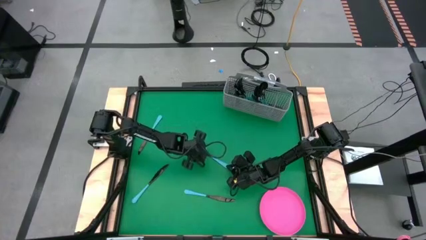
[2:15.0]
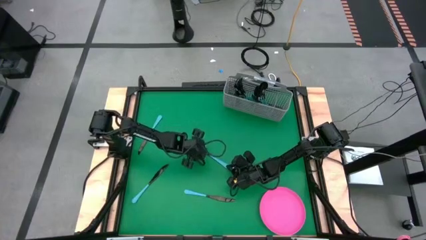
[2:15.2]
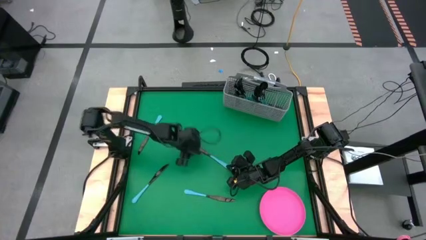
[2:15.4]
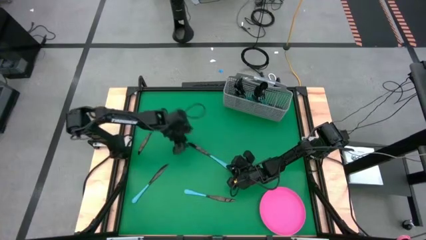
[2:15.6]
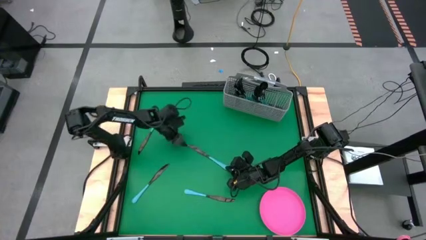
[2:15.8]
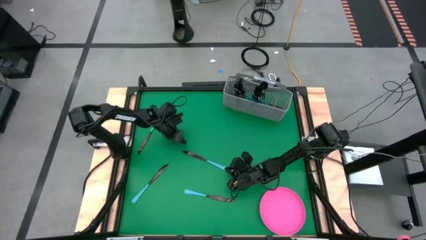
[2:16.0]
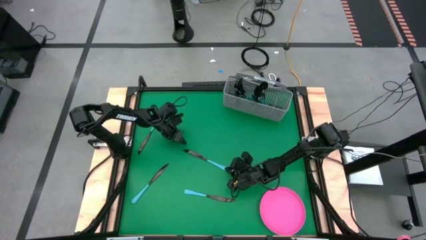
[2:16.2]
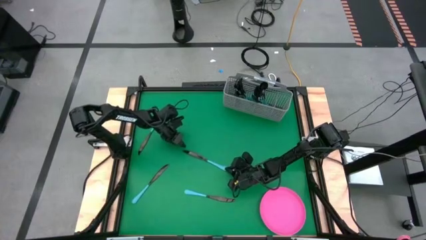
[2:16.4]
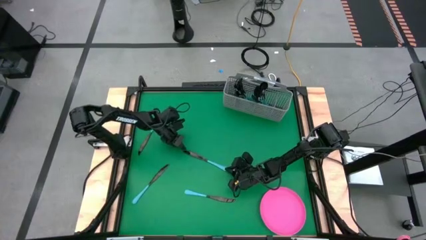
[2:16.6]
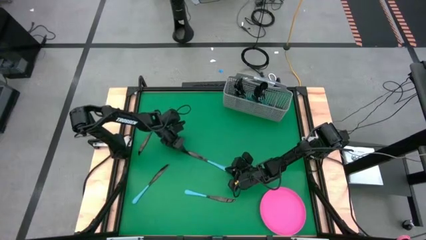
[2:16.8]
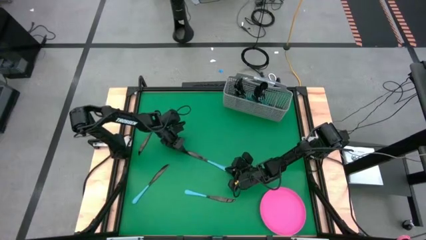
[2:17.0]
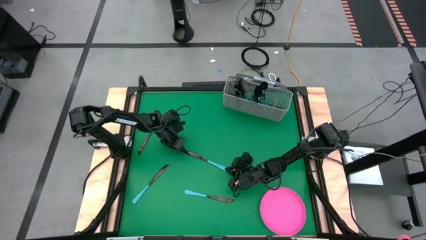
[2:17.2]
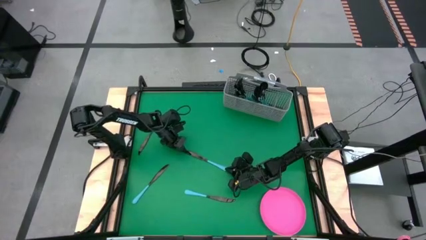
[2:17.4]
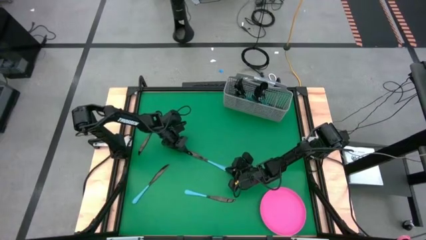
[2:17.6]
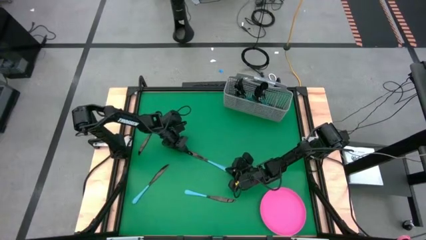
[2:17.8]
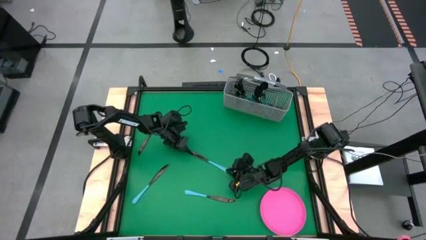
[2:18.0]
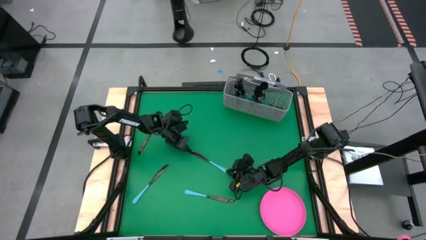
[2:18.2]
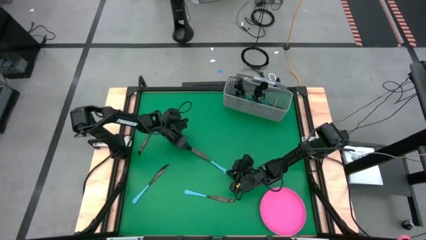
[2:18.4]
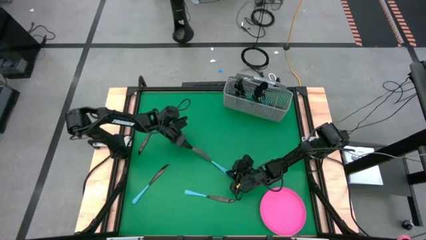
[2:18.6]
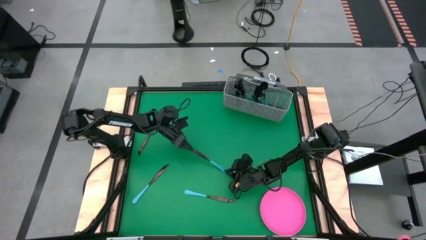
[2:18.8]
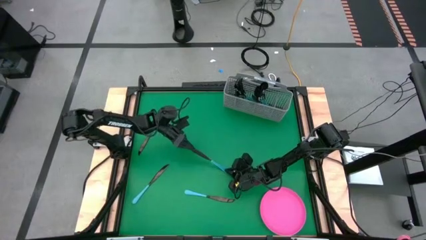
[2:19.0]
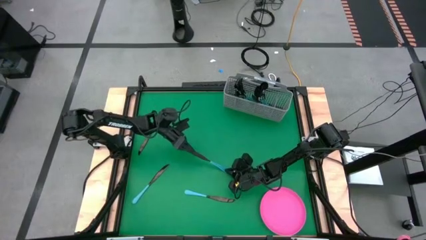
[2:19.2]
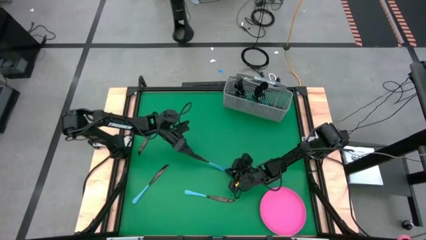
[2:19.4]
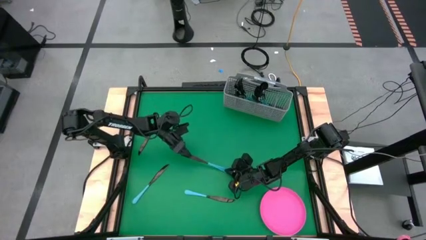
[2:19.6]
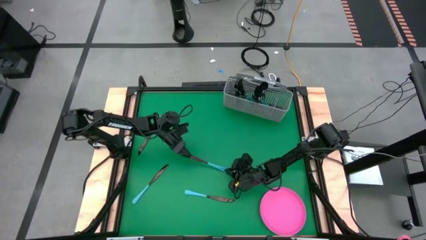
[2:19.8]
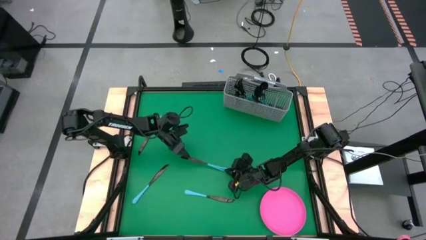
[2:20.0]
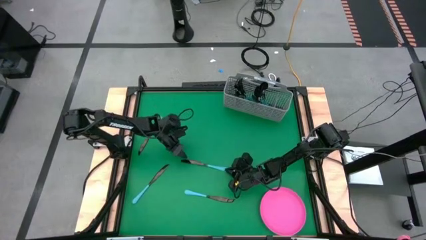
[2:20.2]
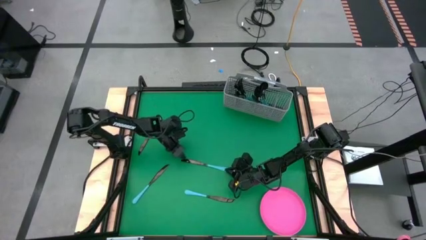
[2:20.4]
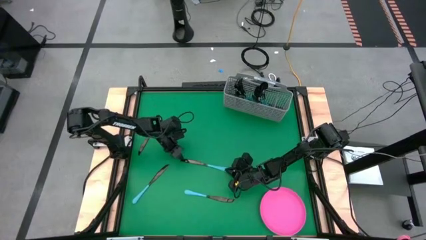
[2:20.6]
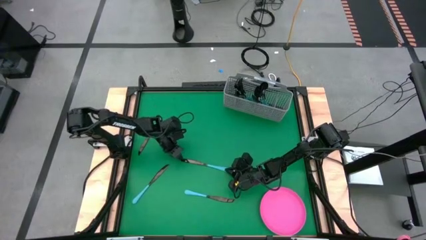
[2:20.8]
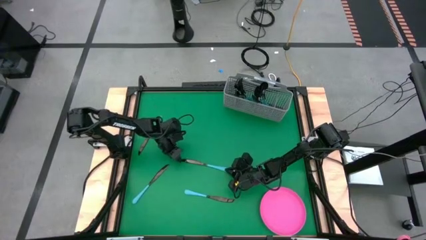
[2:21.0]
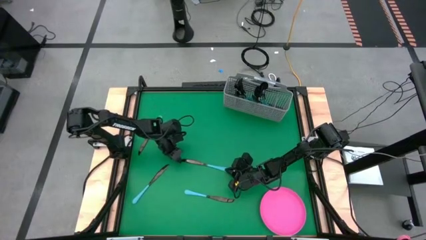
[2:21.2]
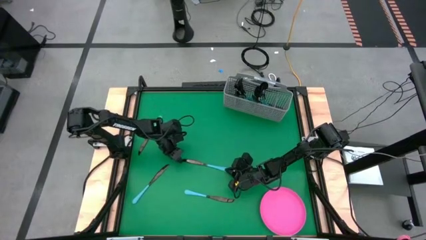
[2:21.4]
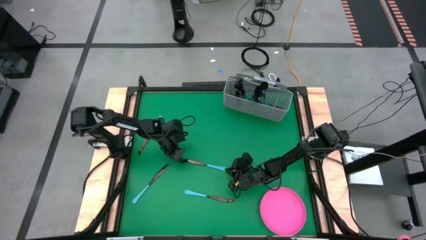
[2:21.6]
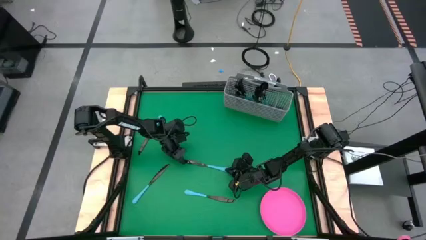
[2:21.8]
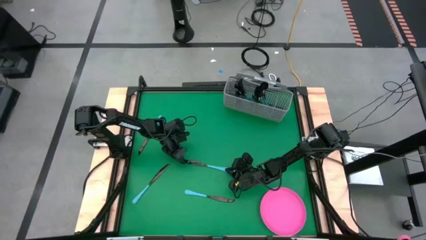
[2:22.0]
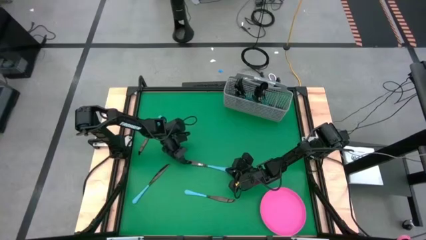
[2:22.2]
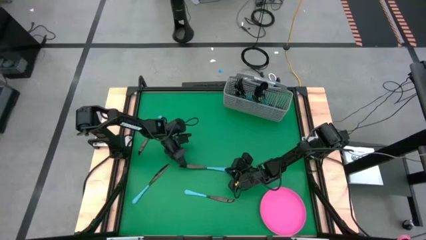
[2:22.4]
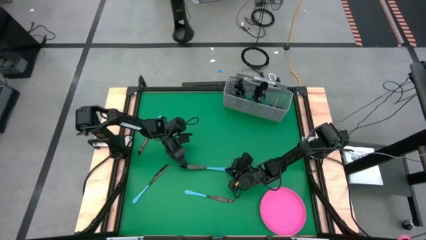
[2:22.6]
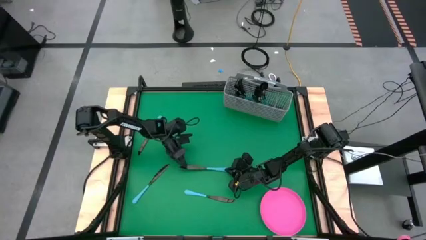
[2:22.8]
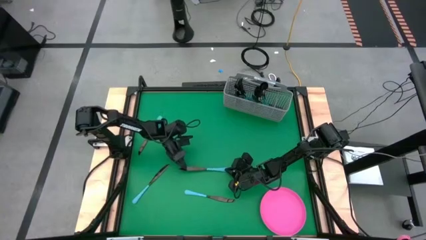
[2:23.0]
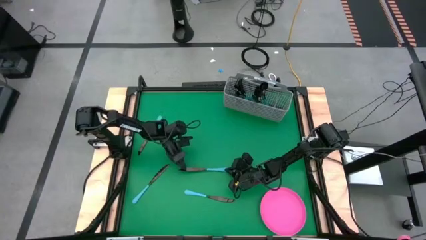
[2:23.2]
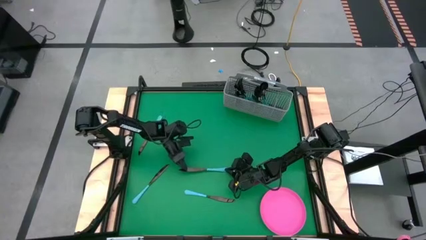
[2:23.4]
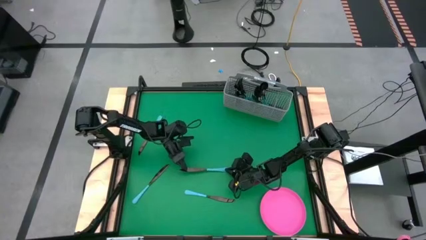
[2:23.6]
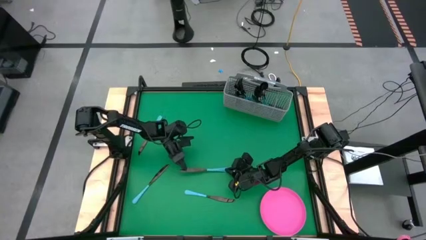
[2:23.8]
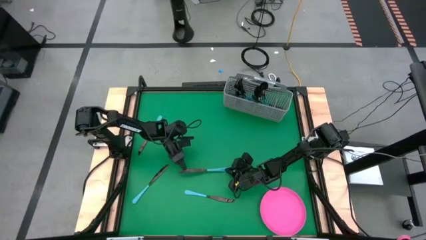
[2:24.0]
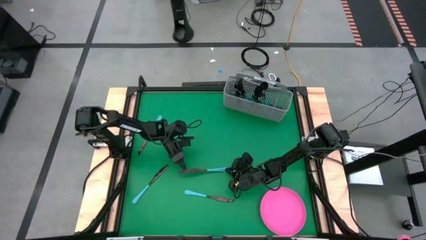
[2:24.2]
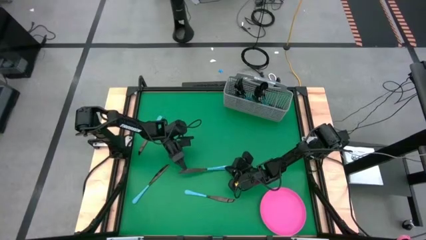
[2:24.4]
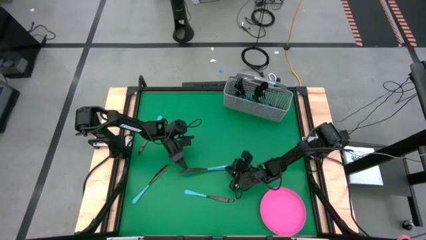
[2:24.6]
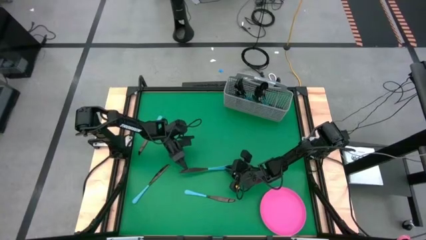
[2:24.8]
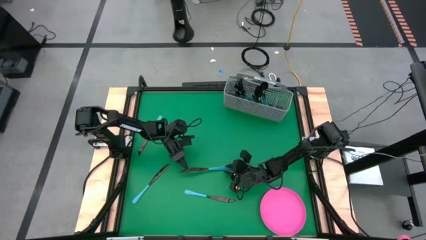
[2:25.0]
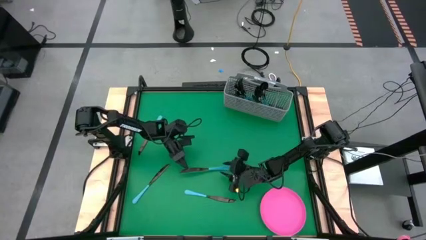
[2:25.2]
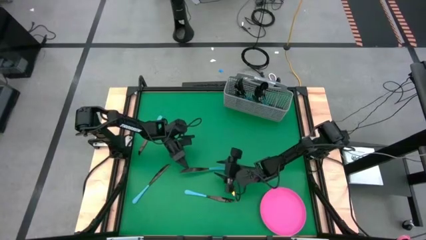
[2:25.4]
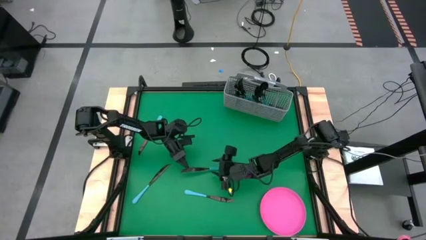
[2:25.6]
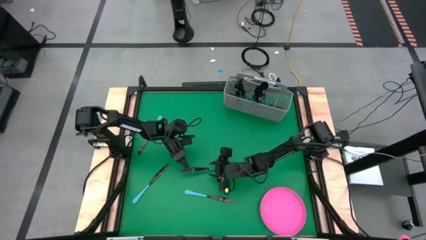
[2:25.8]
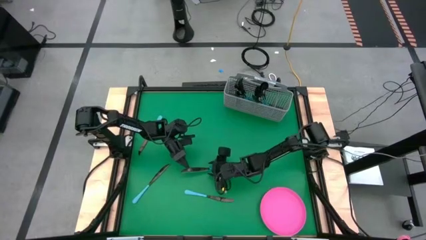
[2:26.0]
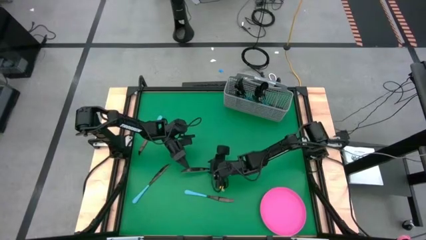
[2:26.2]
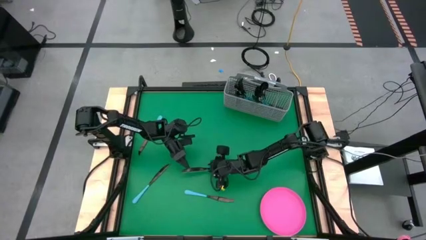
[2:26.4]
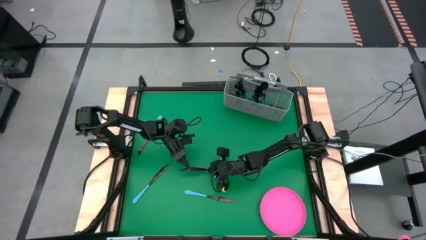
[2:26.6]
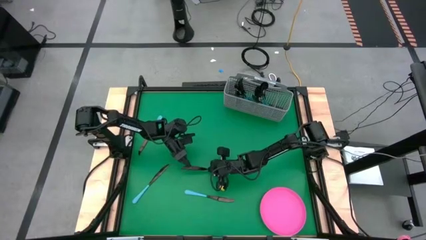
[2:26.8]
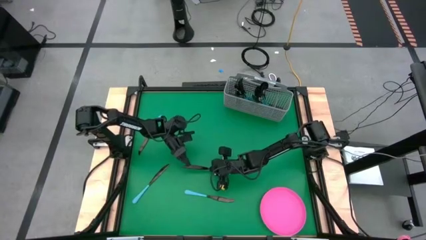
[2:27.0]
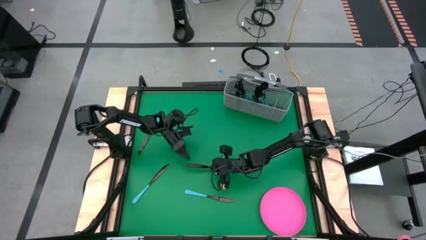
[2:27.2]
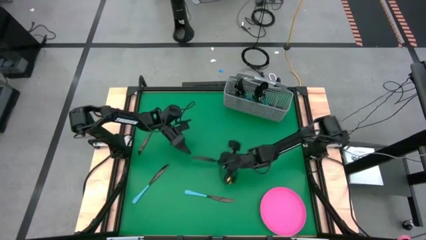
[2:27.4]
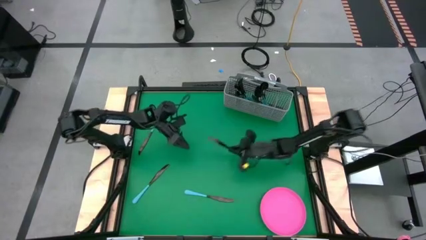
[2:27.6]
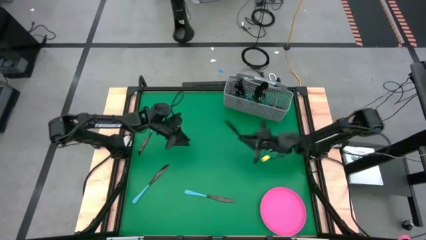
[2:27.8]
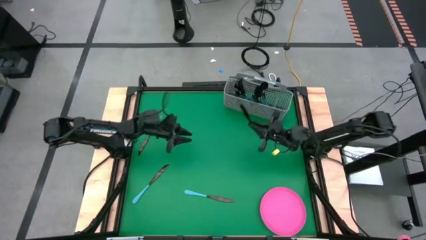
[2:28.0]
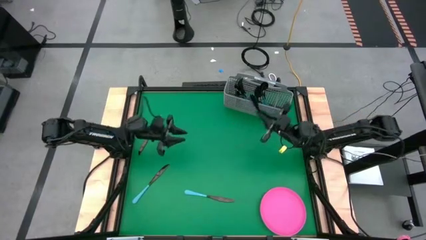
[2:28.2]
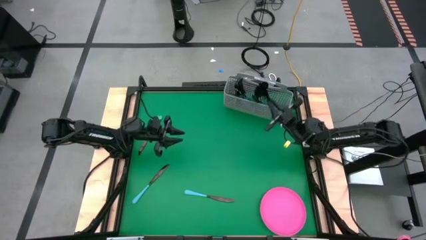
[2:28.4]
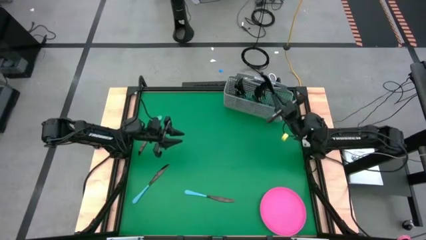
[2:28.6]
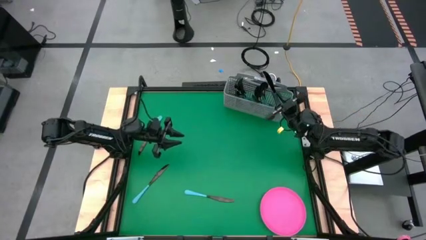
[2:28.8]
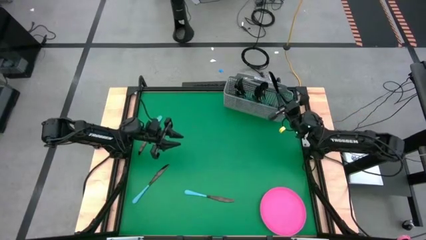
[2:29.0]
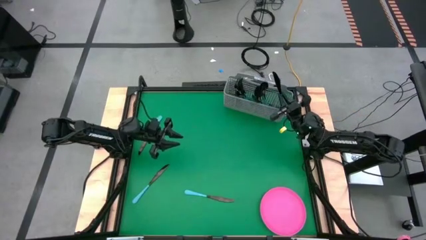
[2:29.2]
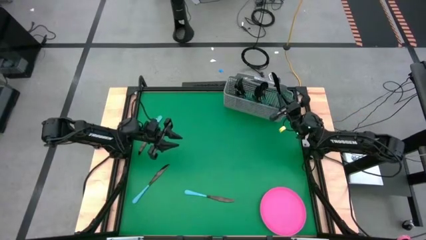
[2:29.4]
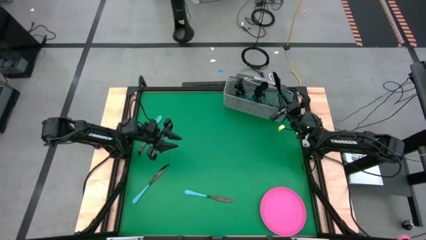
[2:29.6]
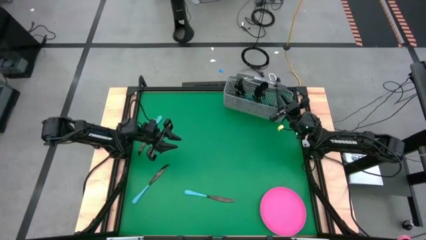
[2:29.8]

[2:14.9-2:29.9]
Task: Sort silverware
Put the blue table knife into the silverware basket

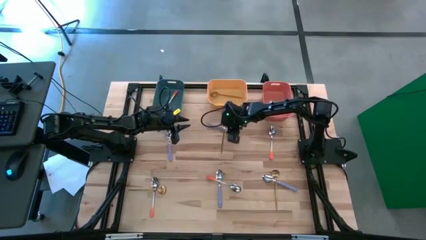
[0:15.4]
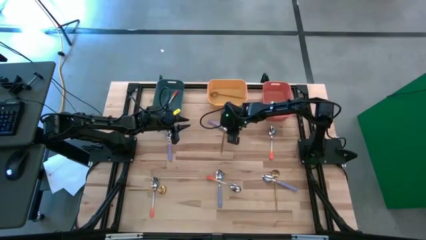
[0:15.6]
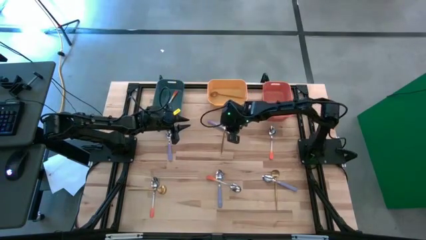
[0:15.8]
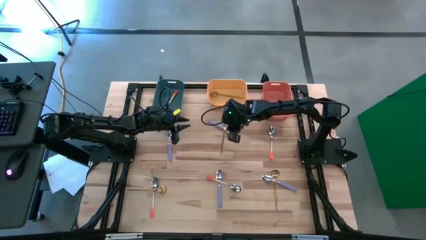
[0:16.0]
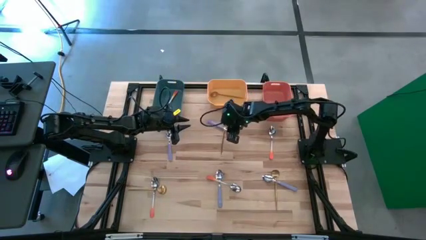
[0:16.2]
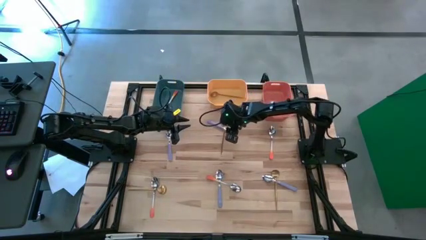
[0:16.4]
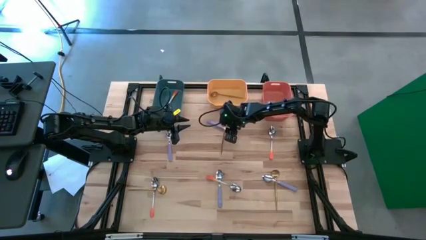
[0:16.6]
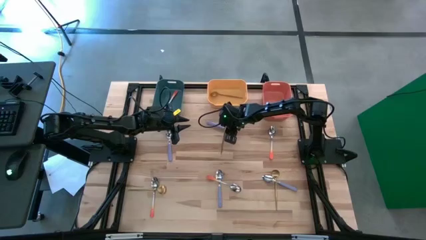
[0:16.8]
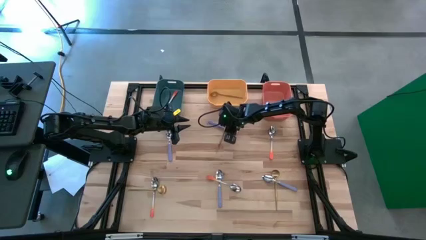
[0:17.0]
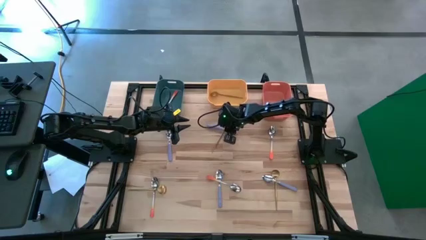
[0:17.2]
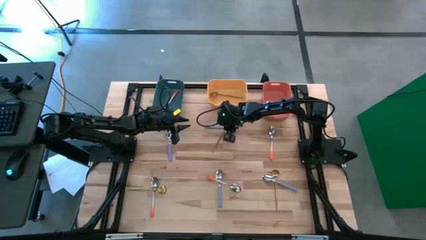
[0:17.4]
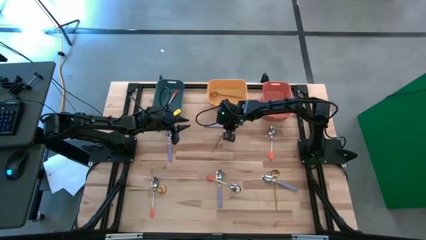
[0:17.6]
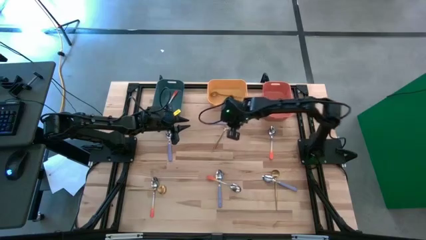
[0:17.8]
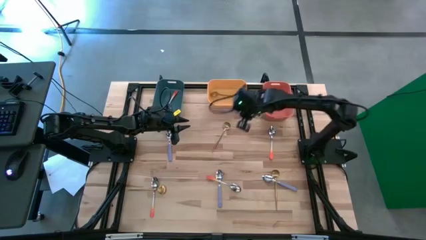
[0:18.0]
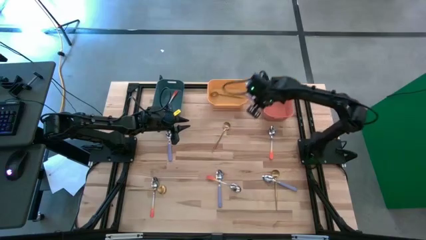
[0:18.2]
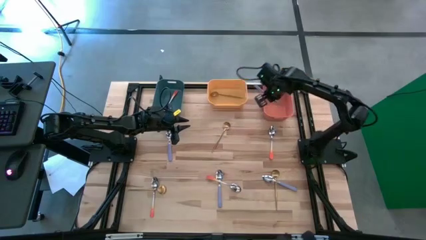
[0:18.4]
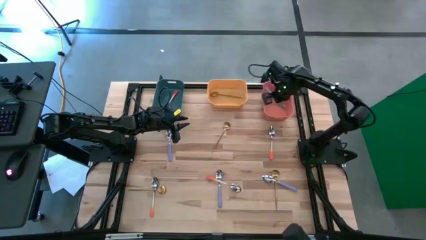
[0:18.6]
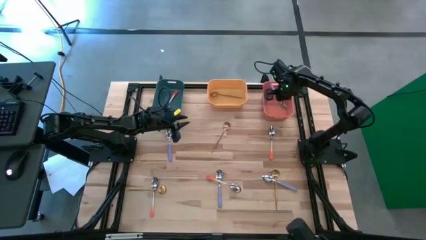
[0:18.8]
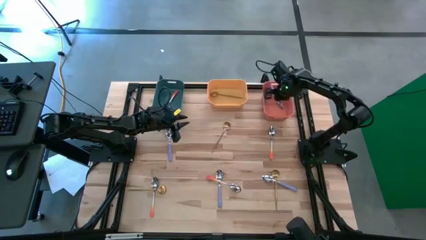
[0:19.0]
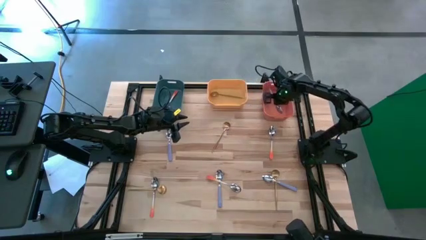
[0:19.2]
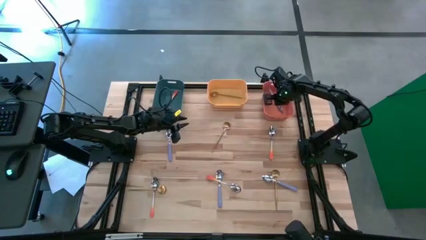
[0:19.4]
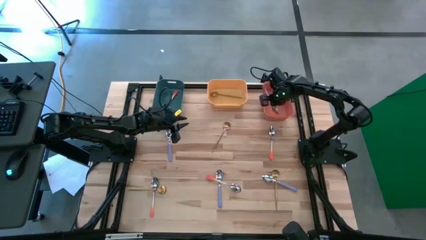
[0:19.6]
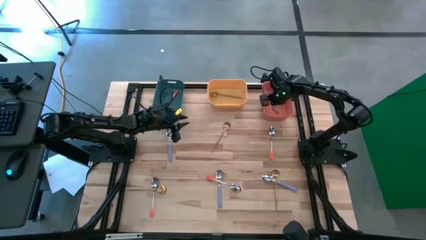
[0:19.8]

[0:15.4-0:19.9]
Task: Sort silverware by color (type)
Put the top right purple spoon into the orange bin
